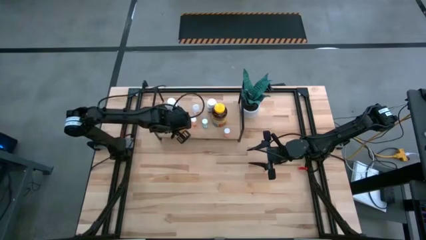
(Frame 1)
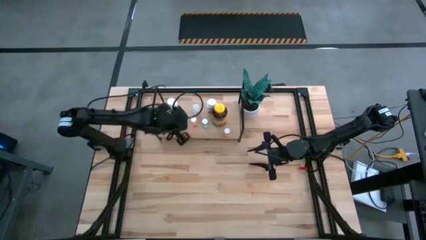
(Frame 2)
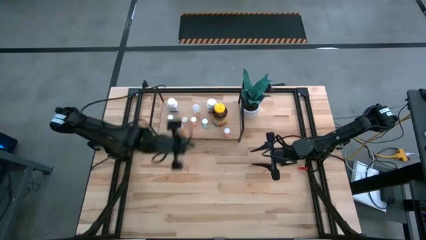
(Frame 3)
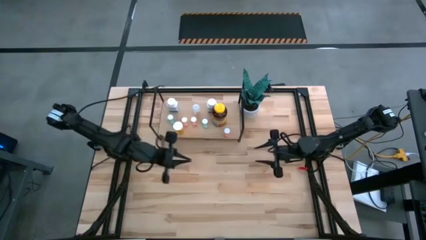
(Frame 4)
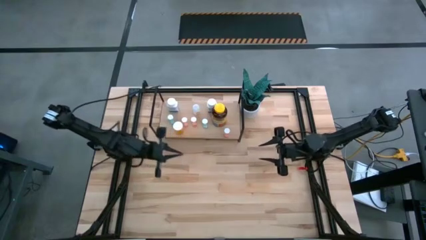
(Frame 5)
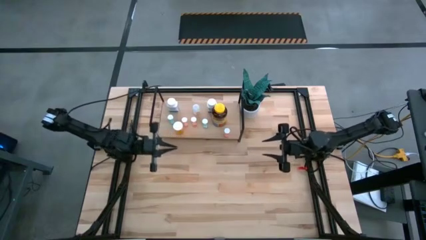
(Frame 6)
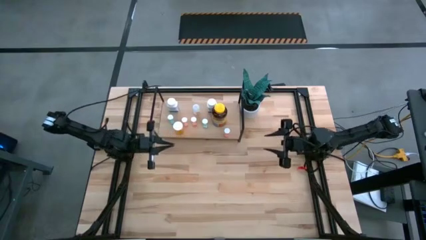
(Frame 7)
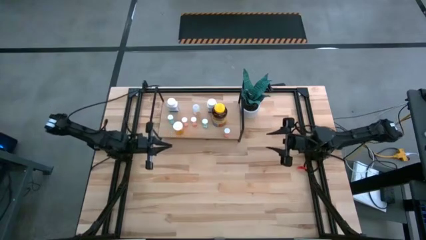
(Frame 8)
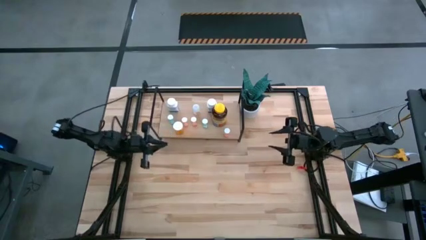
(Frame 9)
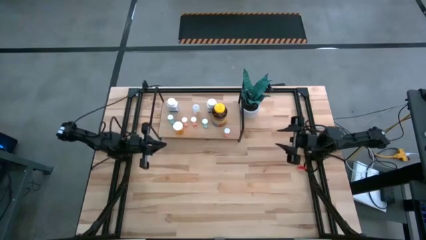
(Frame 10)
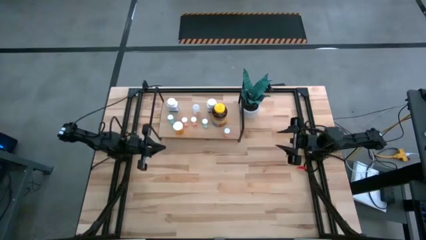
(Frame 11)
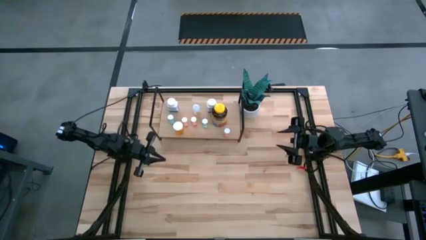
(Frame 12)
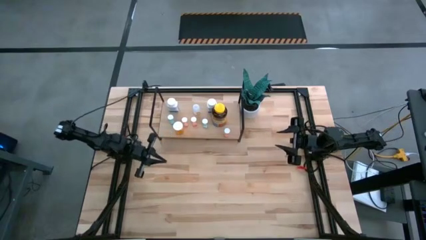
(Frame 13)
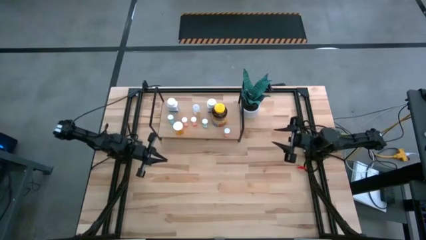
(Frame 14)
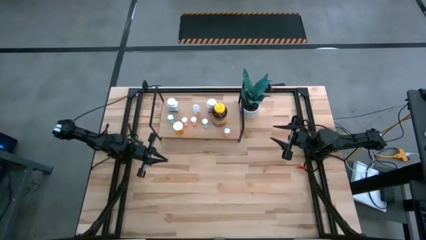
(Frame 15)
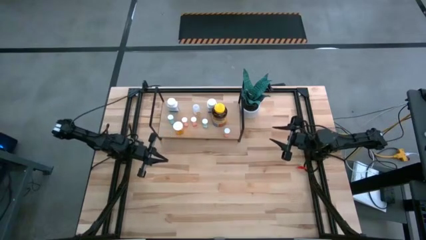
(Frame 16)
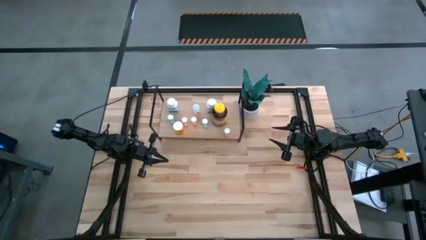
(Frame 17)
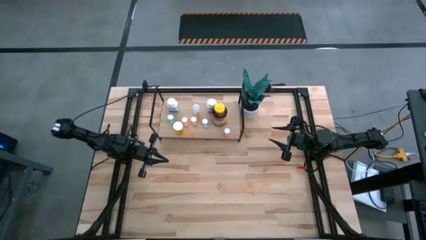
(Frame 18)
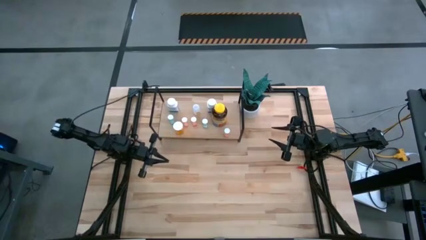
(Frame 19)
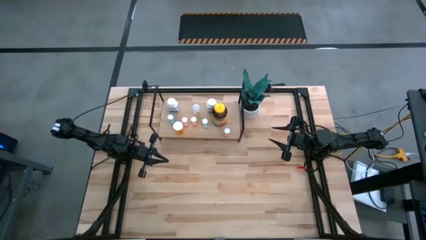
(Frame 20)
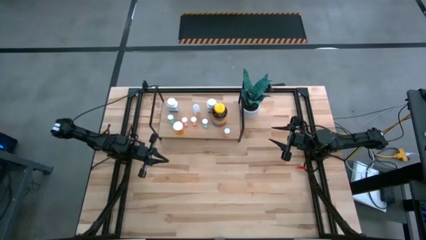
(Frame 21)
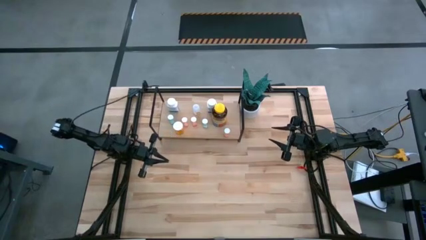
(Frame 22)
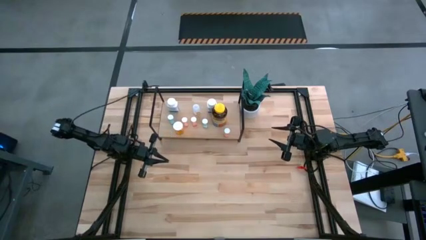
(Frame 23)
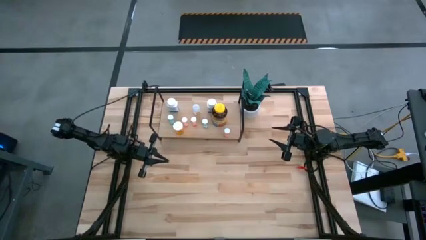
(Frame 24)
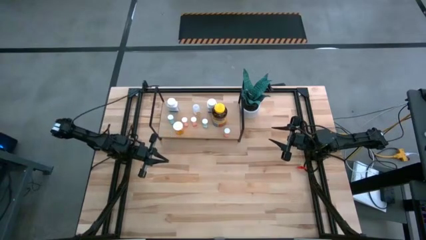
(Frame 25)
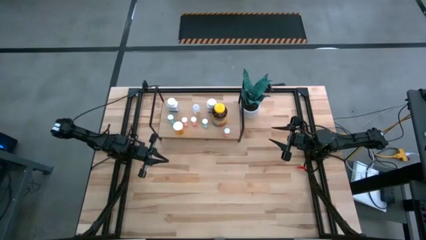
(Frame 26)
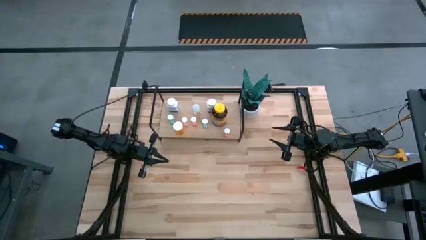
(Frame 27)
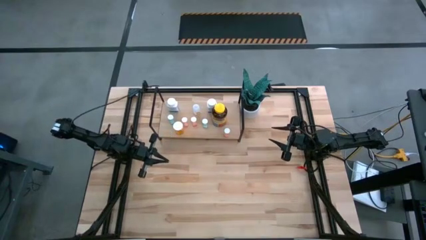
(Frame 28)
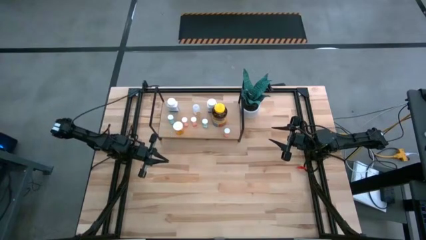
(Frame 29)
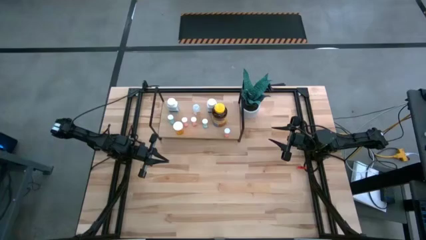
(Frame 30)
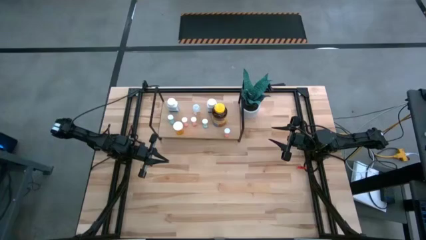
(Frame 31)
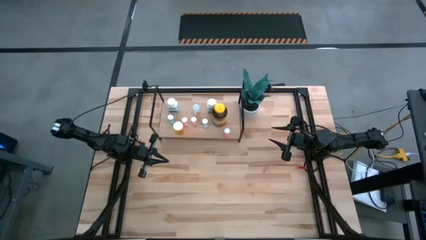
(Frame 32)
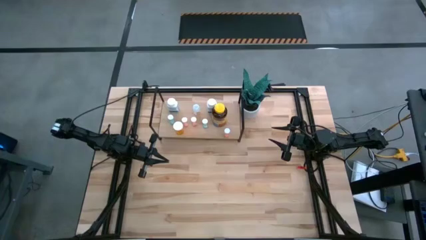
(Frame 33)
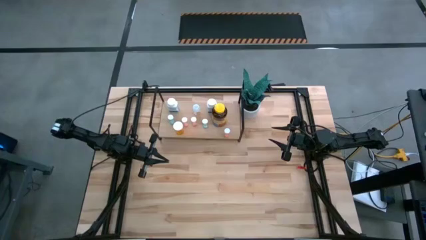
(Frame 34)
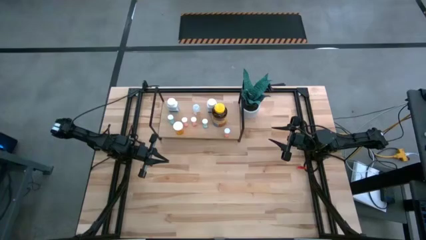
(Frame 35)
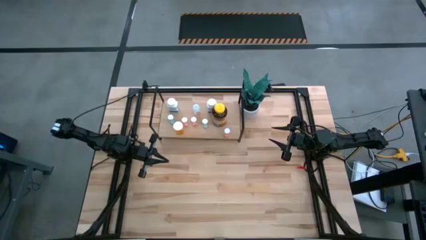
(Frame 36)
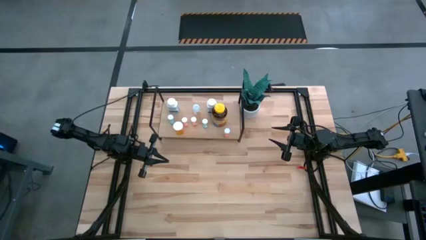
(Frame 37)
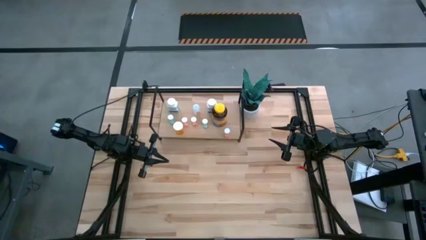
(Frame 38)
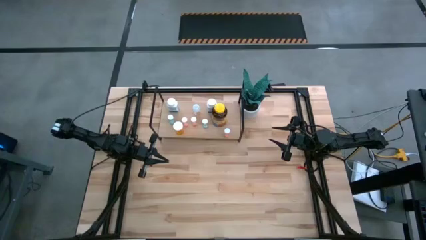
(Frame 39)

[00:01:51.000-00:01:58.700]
Task: Pick and place medicine bottles onto shelf by color
Return to Home Position

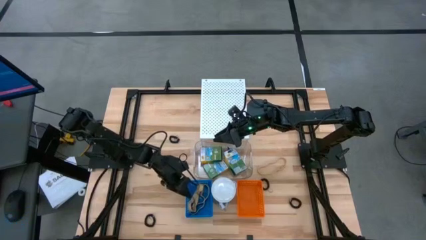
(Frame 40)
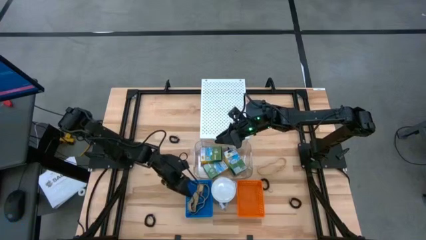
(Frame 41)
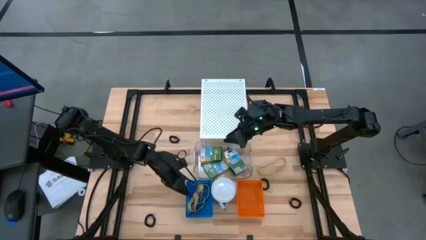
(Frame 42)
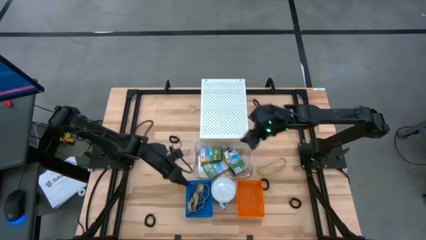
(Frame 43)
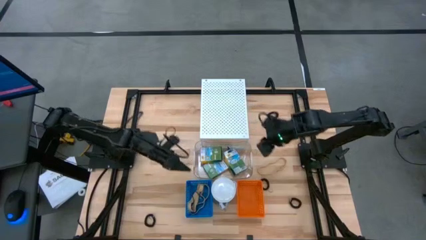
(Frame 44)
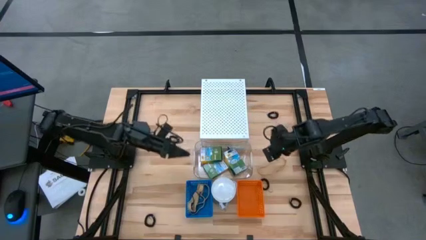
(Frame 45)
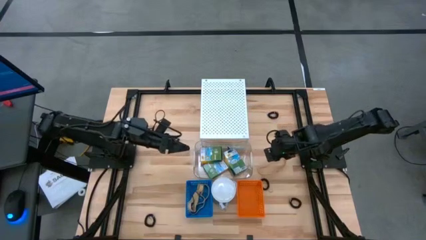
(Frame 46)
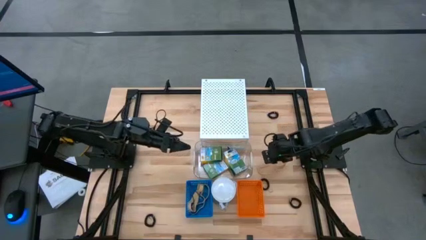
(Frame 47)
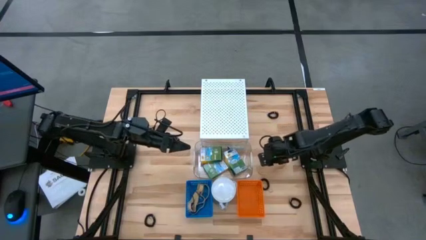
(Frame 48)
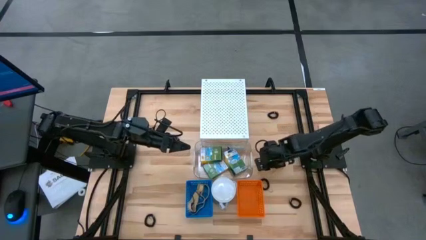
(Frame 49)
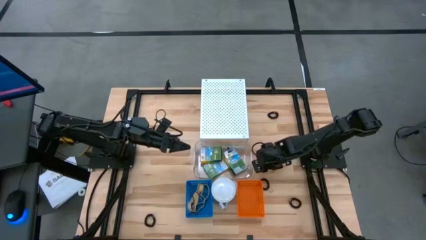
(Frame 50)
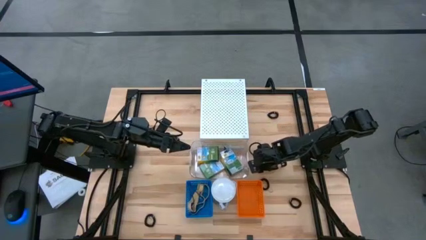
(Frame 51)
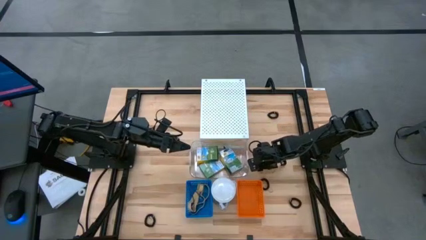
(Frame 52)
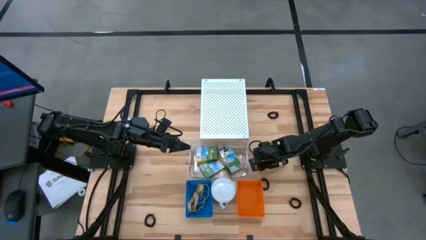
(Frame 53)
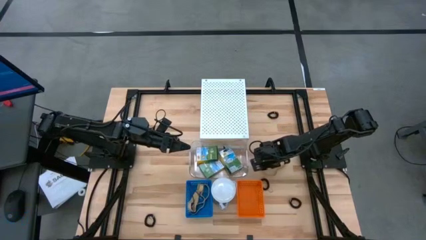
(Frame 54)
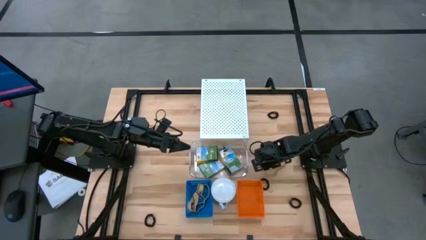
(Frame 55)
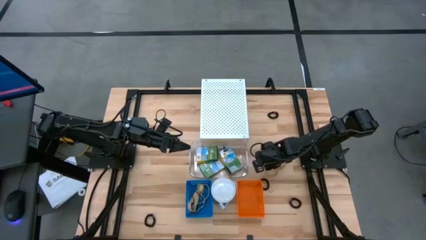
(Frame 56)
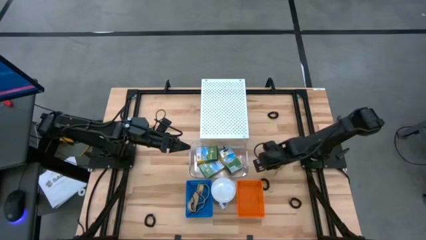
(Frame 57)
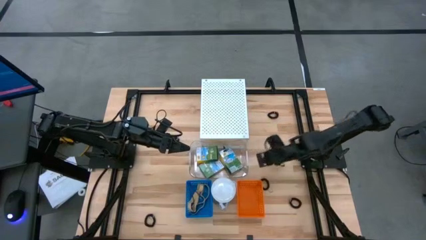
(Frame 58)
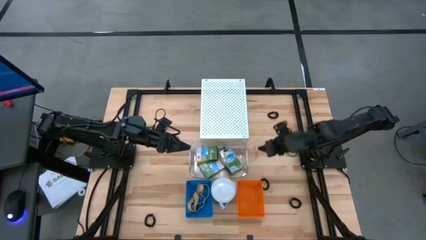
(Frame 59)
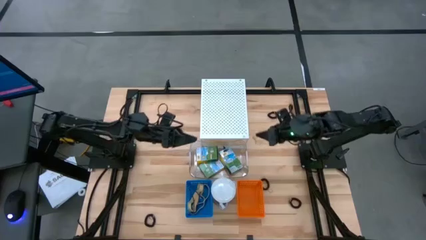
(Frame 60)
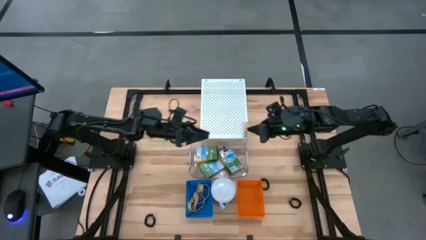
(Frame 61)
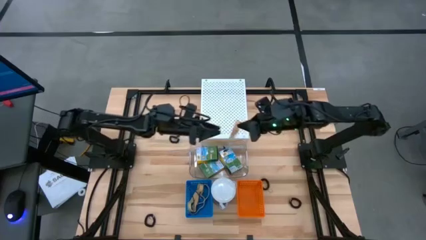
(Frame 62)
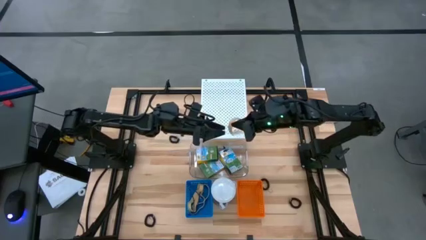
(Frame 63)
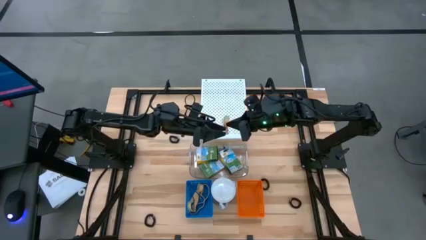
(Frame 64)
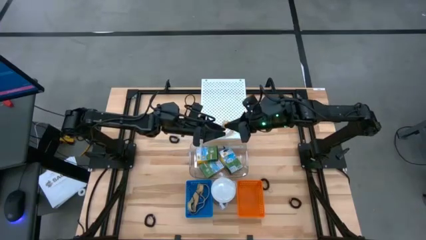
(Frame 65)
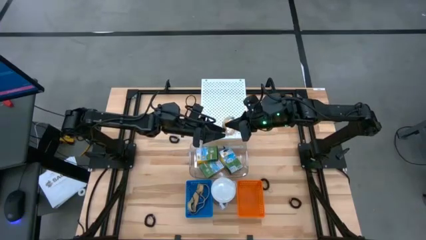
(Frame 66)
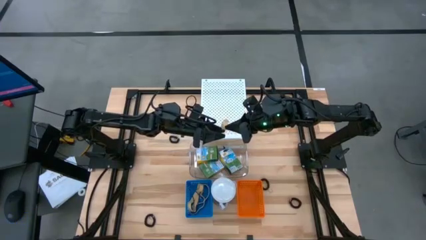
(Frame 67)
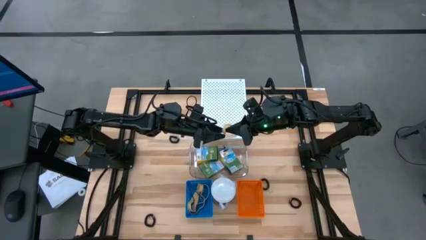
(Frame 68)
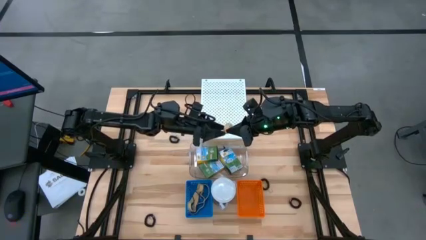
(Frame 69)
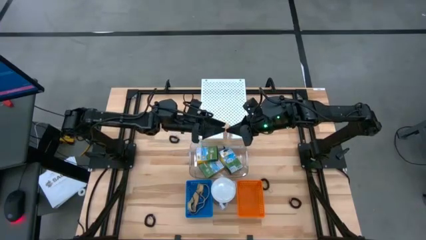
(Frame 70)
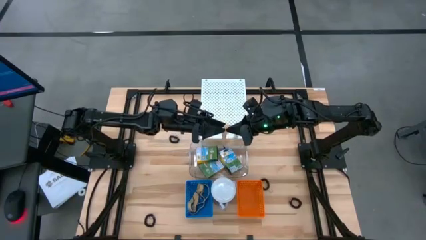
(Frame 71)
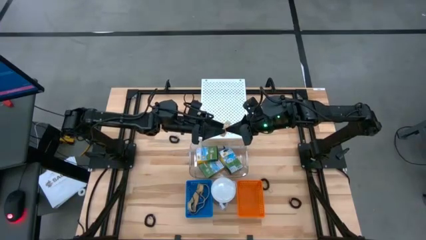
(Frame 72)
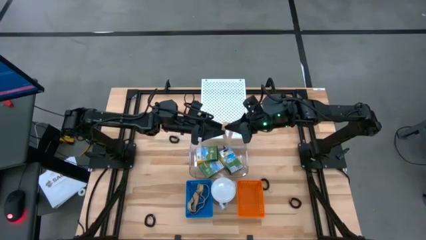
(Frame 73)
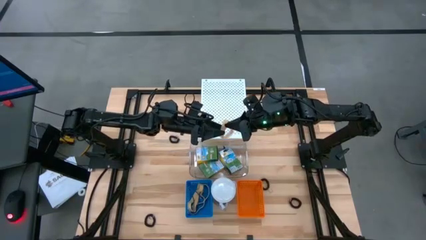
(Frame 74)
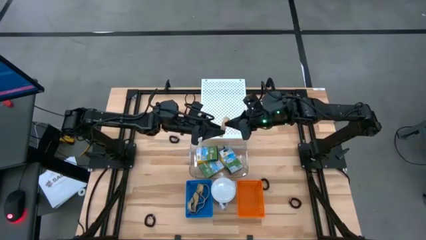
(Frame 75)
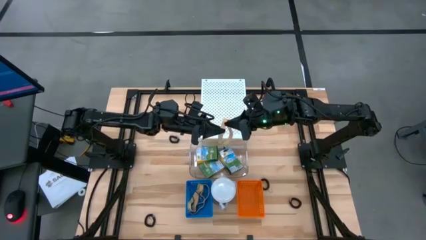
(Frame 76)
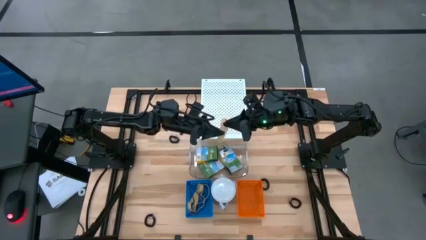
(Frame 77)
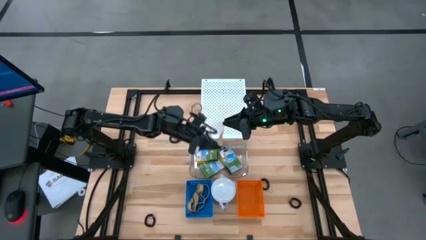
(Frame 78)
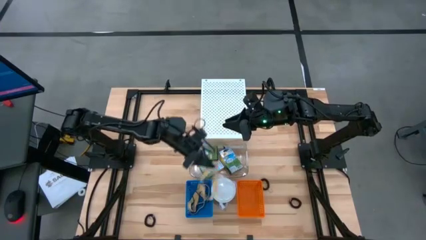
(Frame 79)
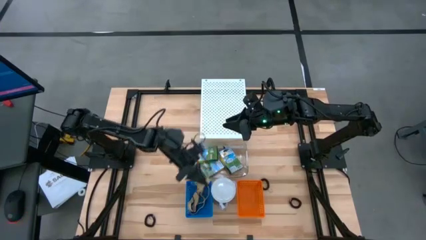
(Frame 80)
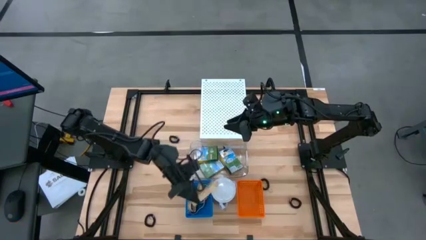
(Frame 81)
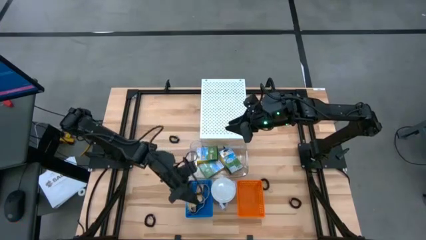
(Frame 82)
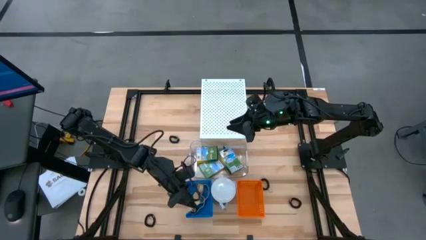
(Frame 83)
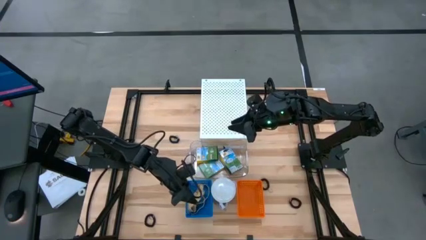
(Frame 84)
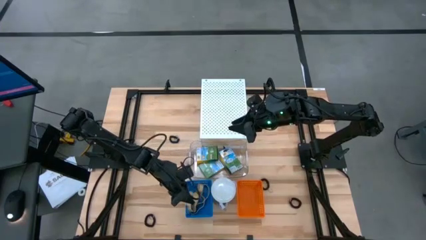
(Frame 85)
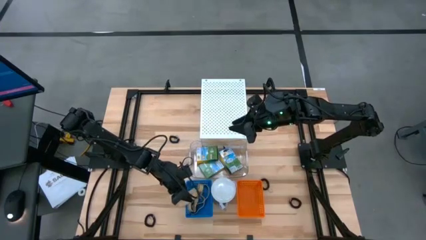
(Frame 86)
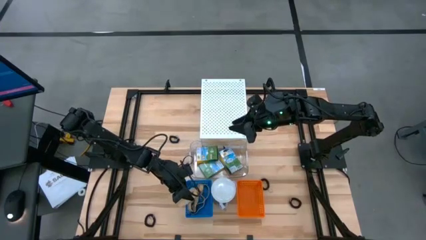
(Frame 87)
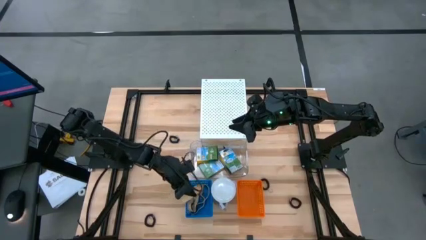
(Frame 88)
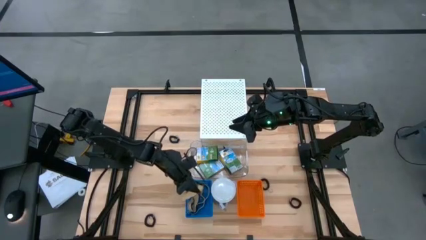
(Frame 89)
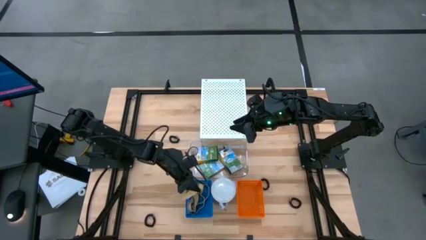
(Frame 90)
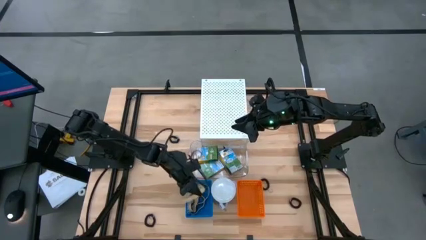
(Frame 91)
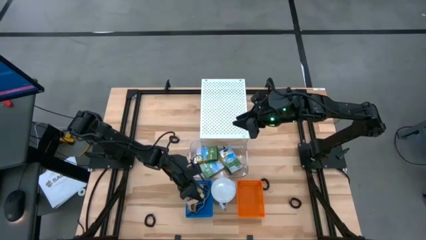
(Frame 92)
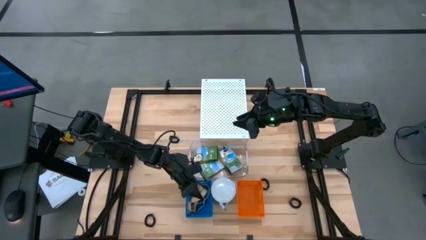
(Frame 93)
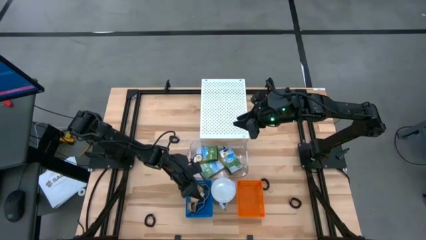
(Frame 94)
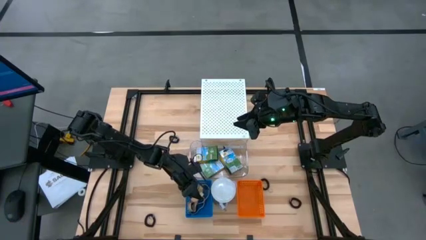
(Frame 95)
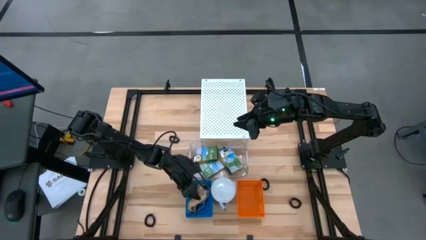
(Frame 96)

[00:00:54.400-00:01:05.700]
Task: Pick & Place Office Desk Supplies
Put the brown rubberband into the blue bin
